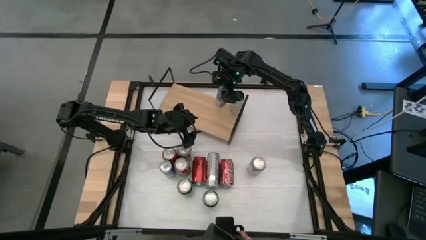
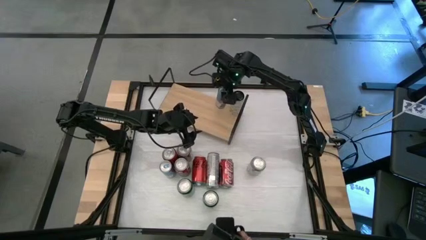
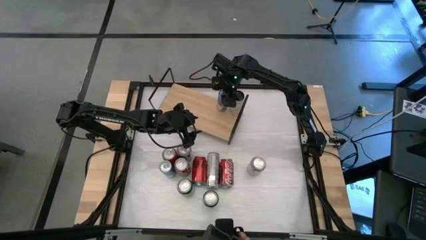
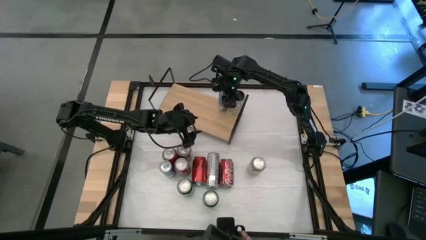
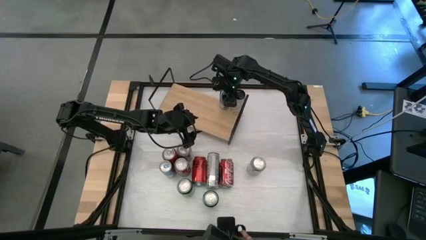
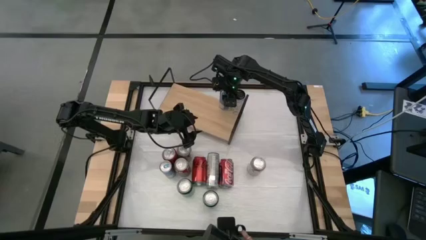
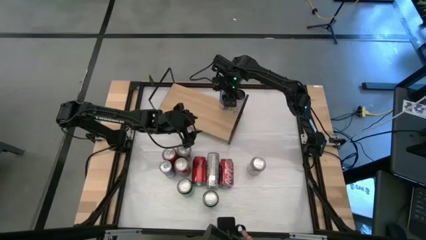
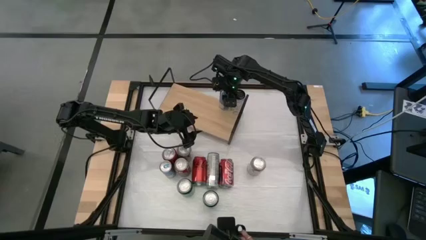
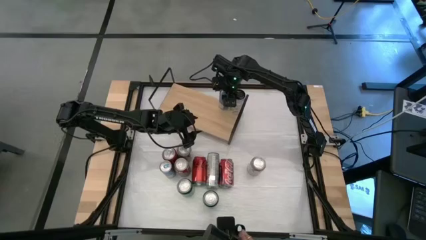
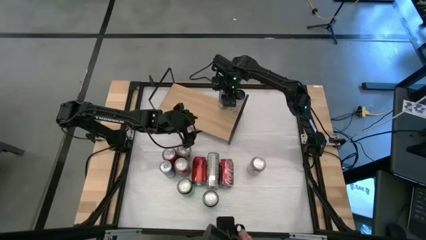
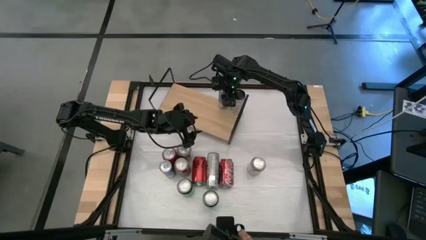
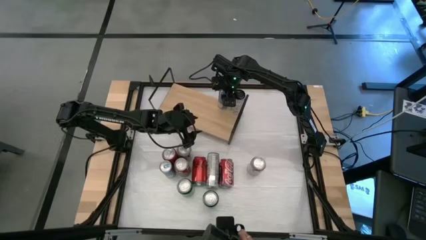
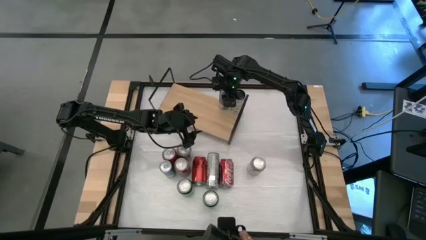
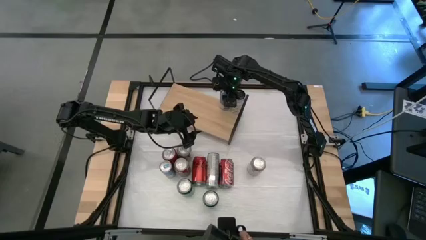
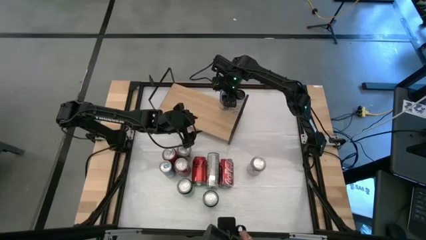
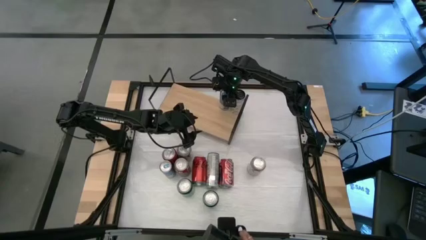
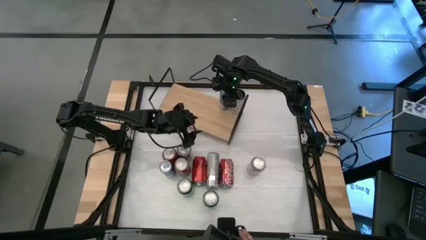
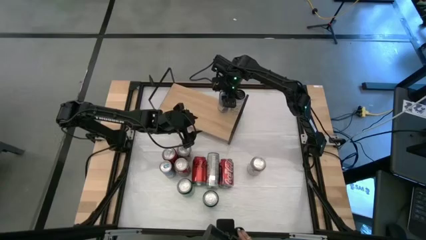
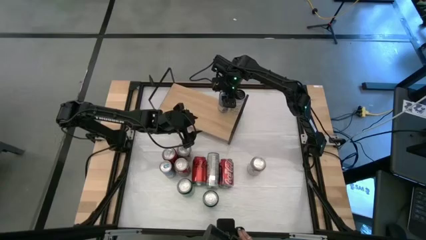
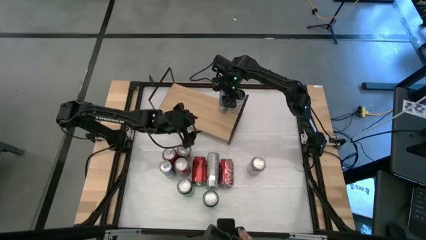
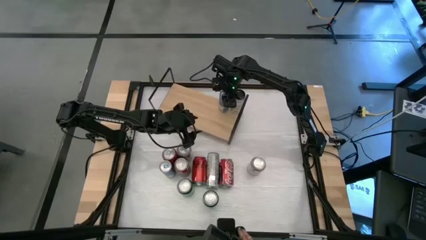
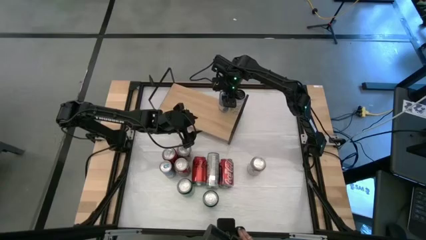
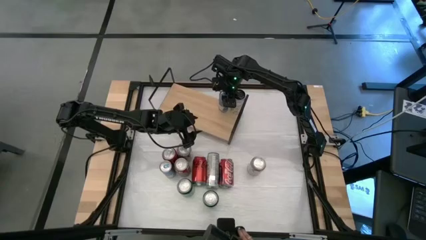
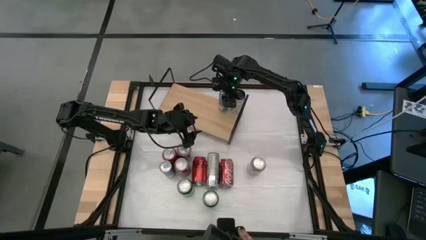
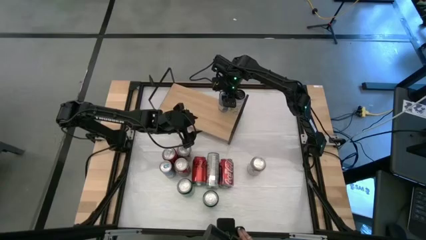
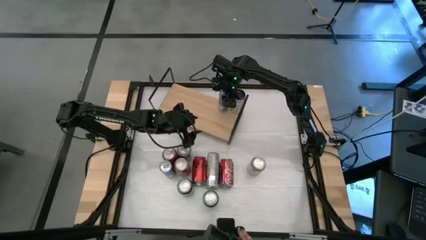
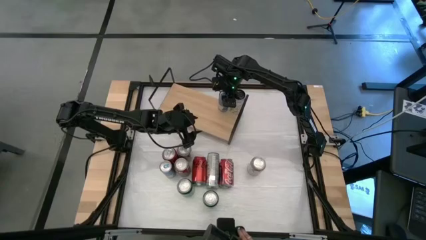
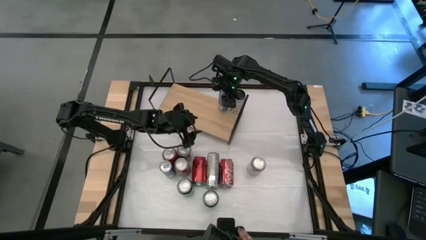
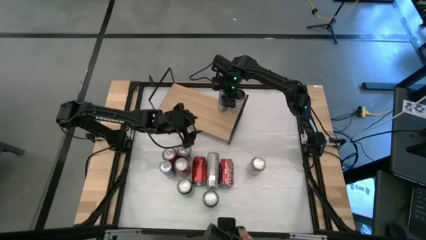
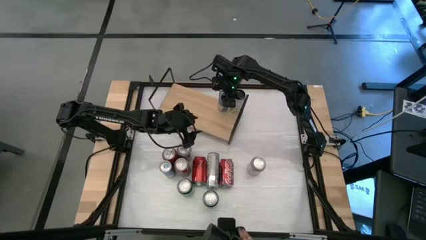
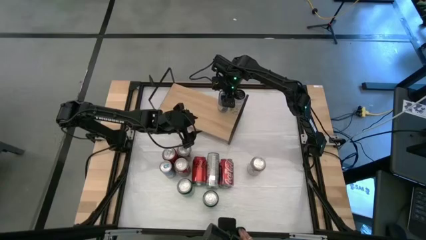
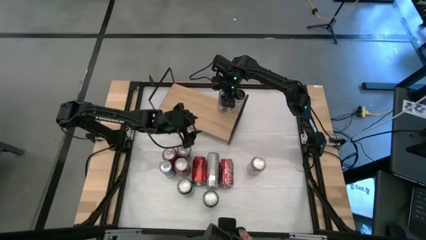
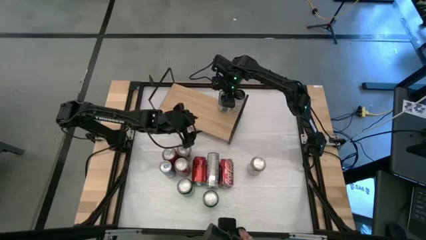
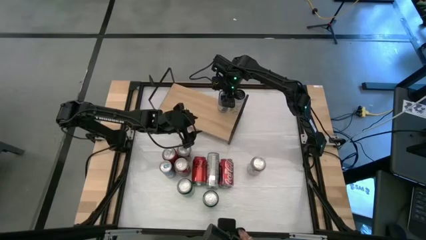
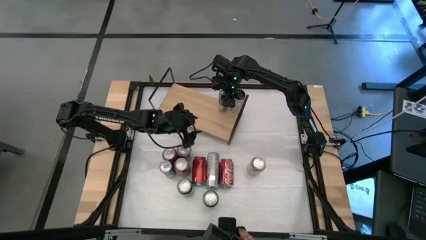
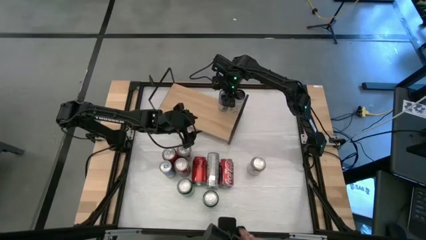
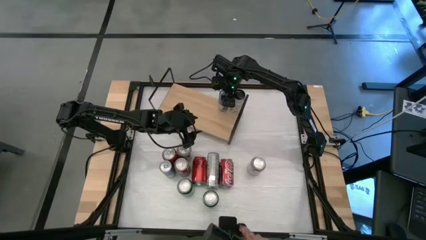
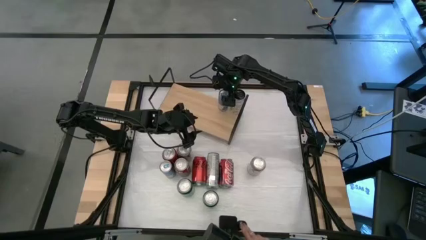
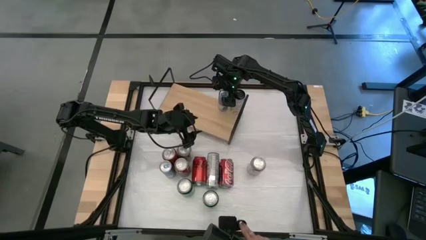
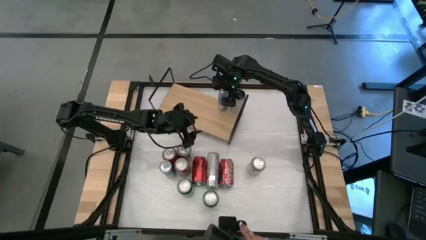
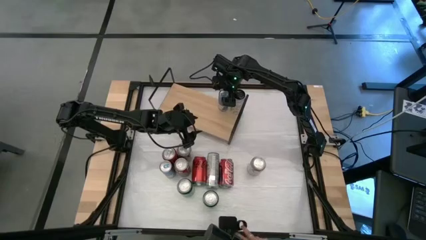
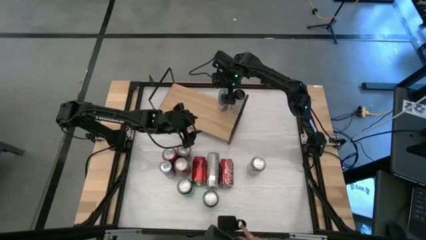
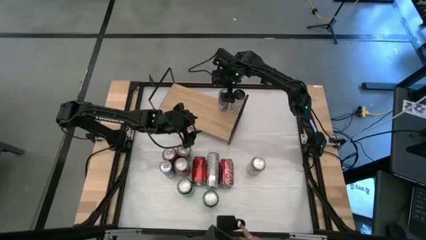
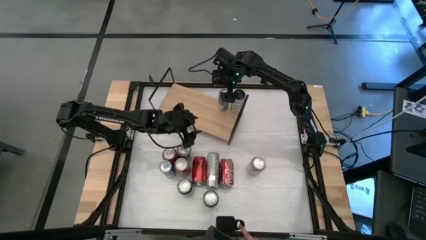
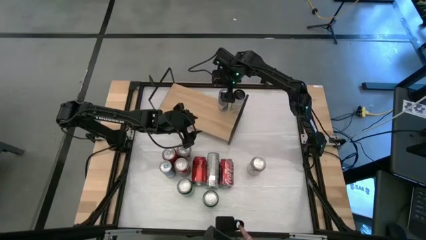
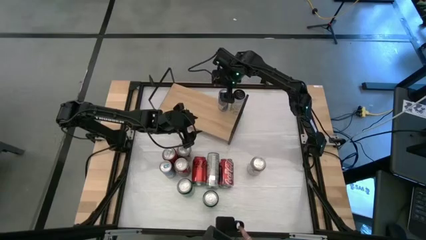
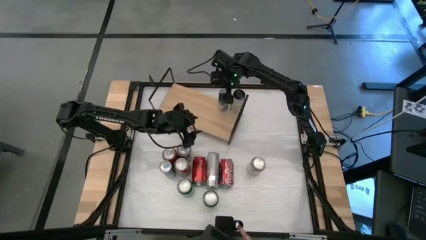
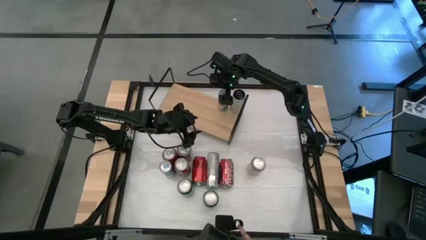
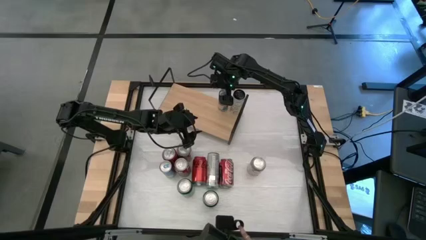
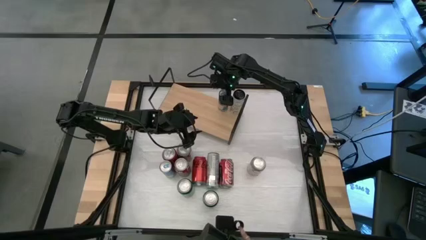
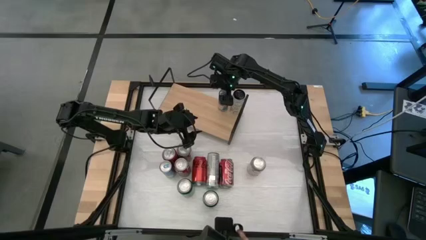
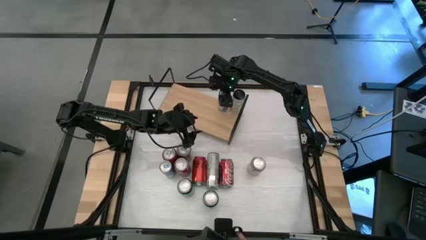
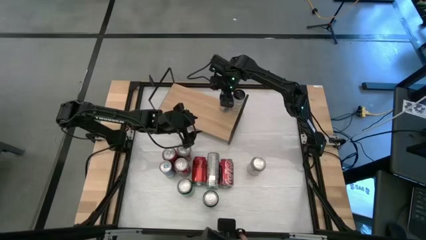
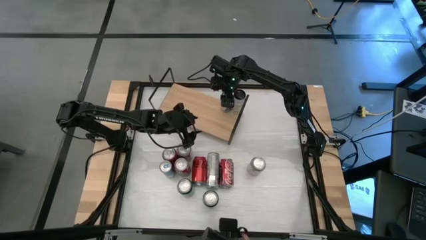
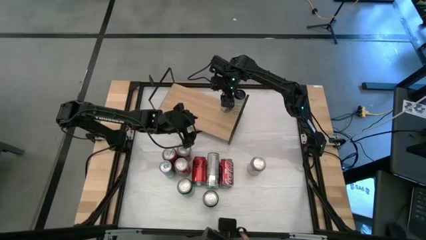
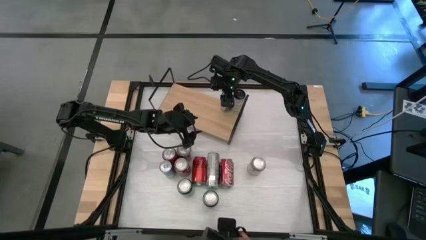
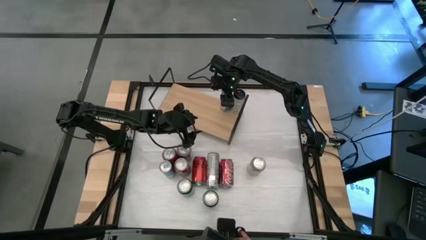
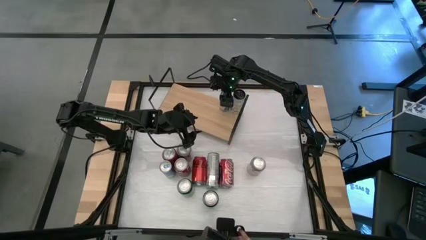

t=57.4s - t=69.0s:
Task: Place canned beverage on shelf
Put the right blue soda can on the shelf

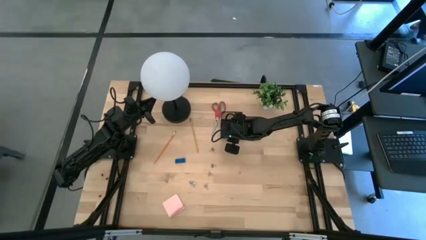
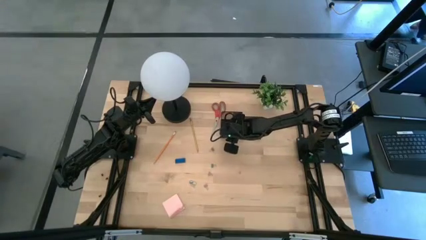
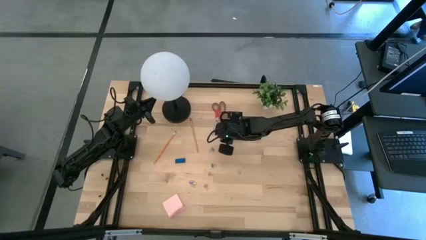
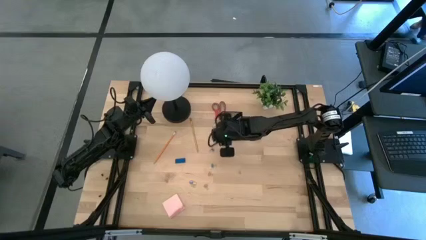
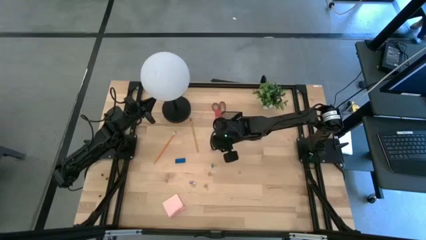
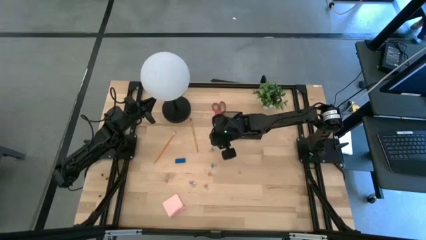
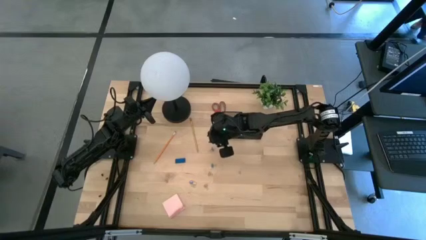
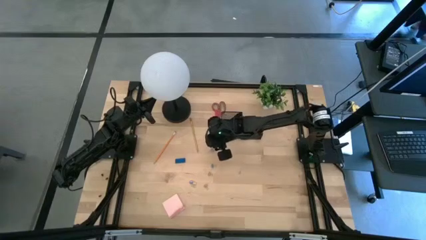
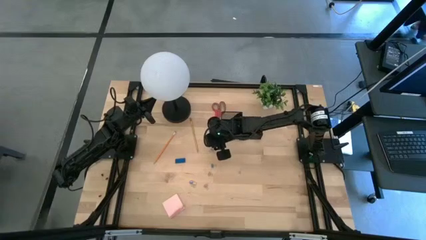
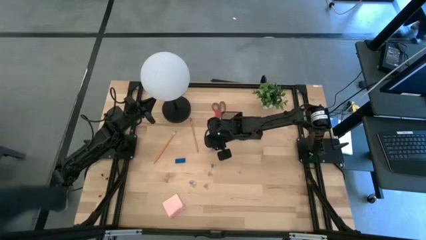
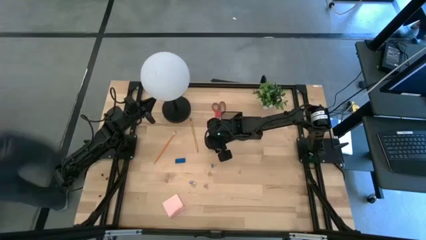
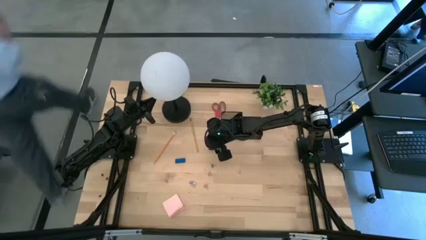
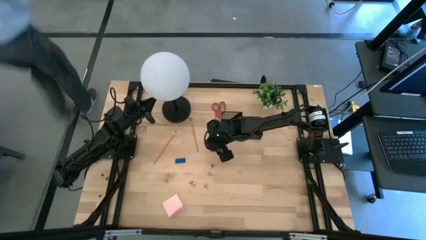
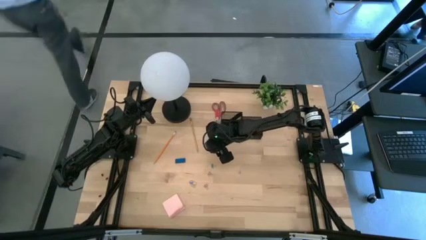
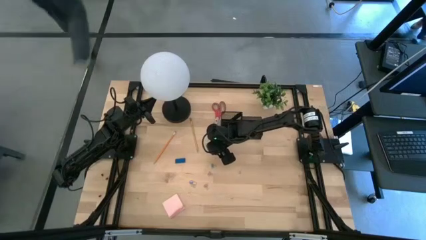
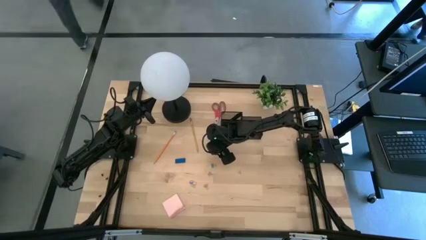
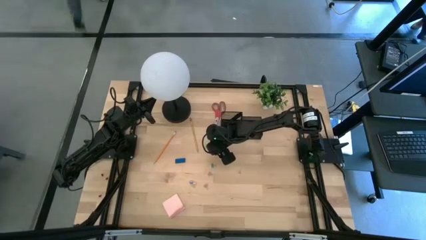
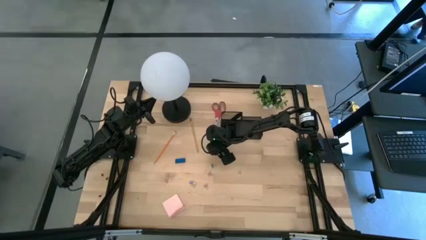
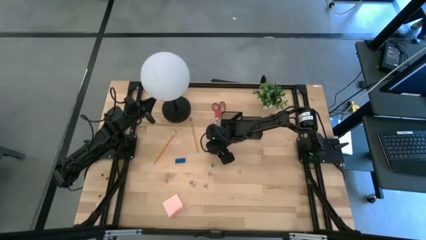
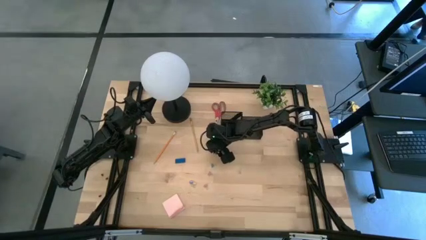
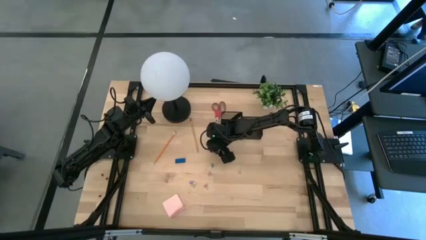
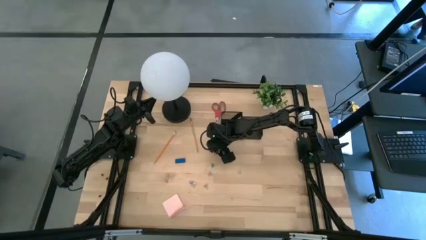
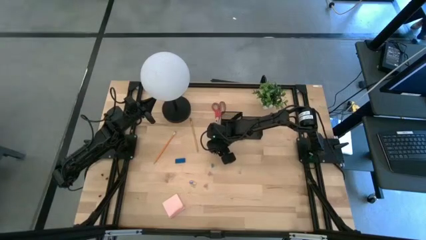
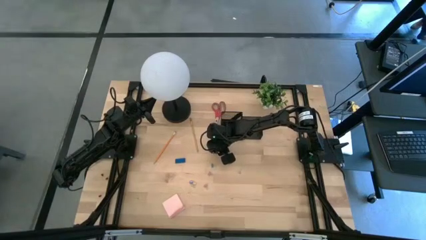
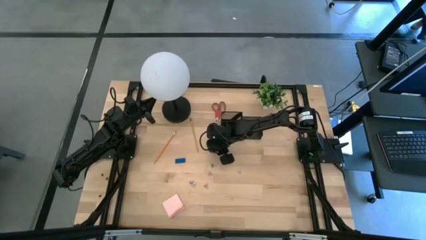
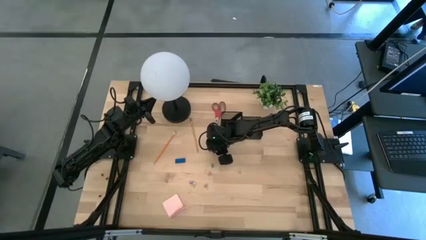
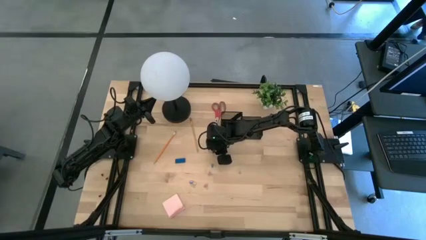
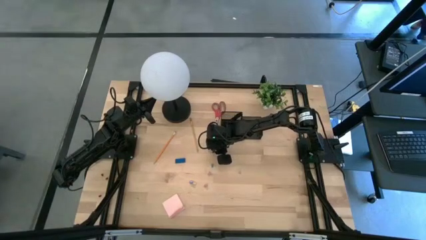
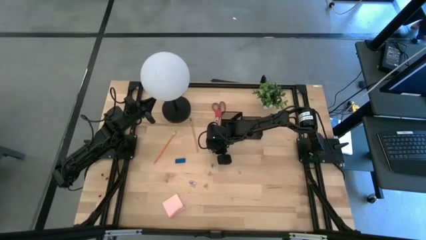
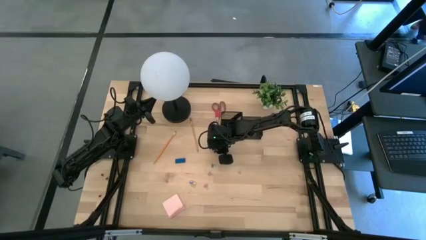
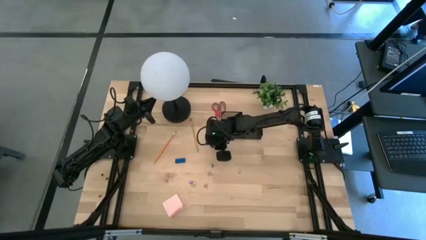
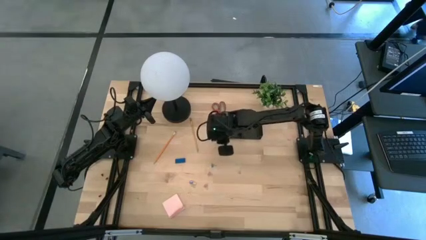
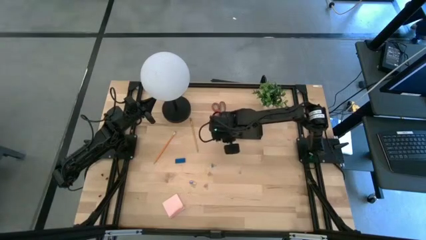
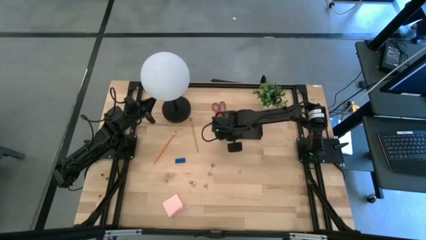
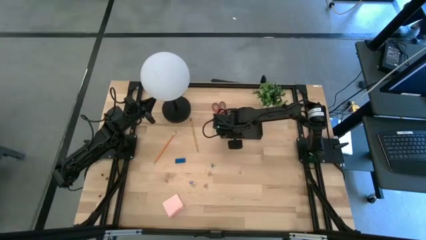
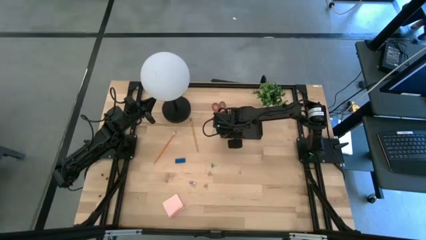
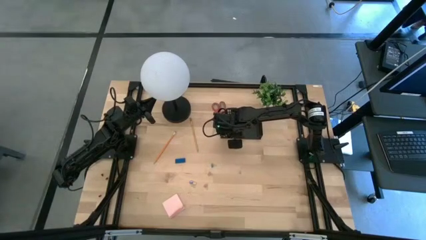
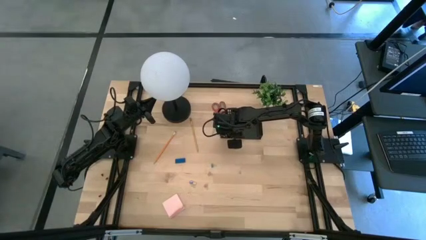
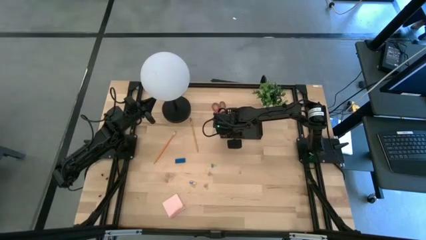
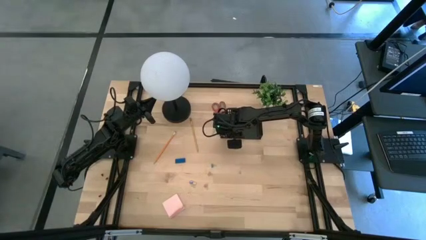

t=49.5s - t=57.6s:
Task: Pick and place office supplies into organizer
Put the top blue clip binder into the black desk organizer
